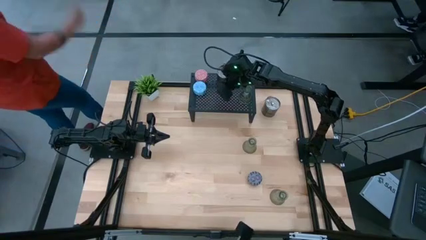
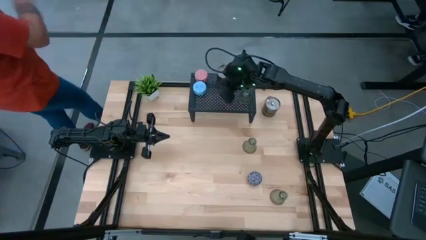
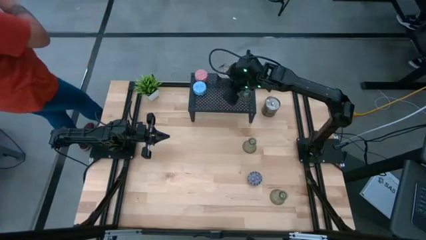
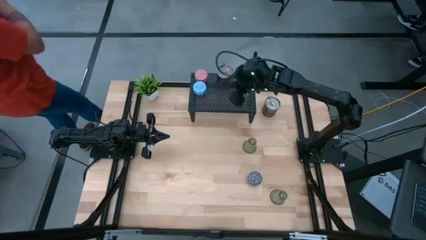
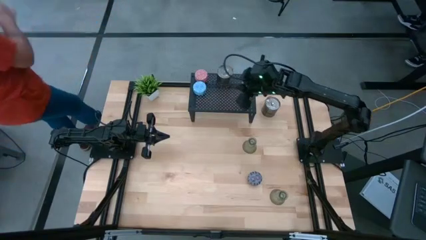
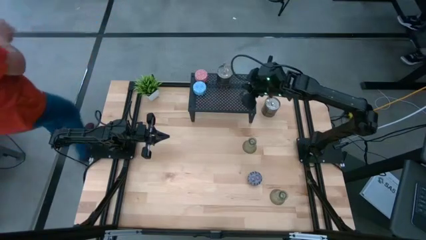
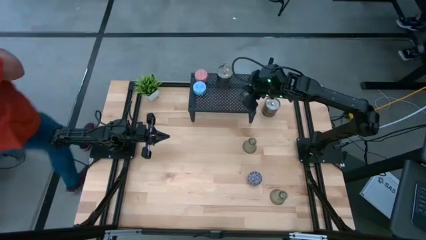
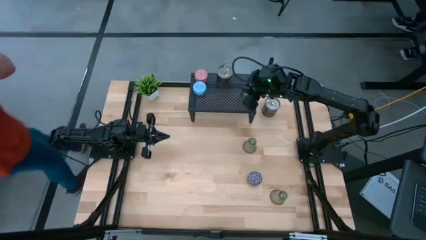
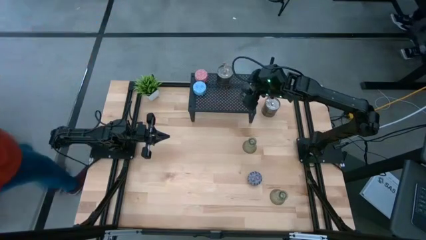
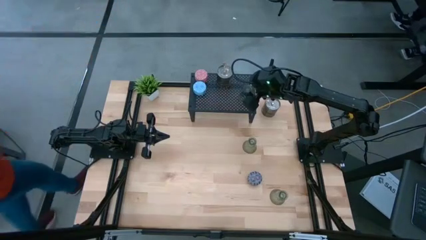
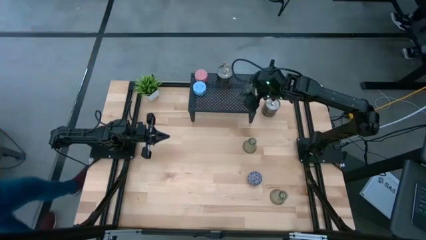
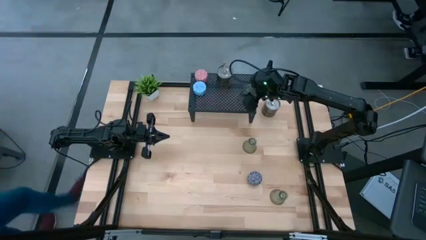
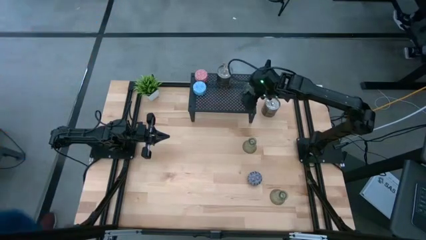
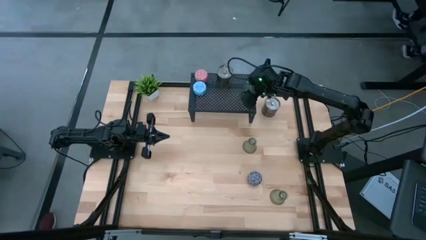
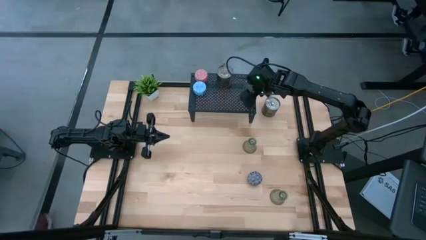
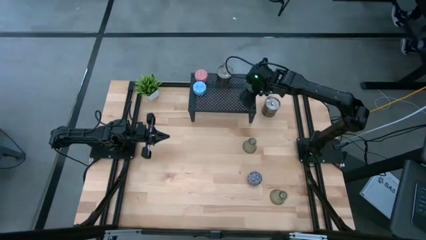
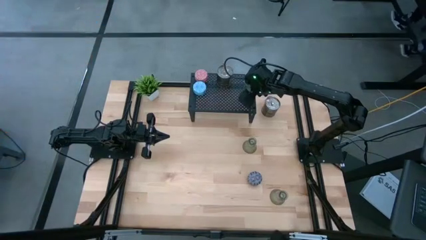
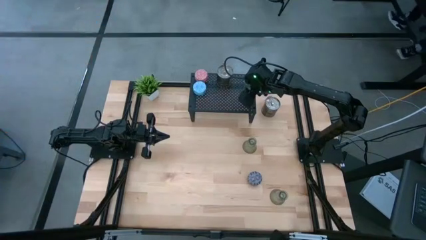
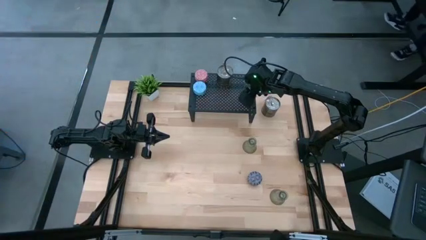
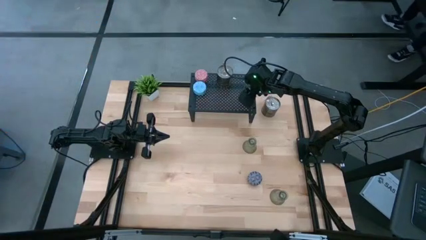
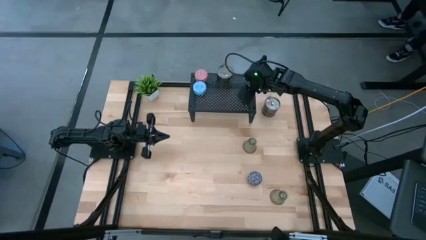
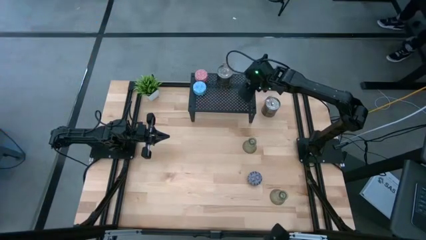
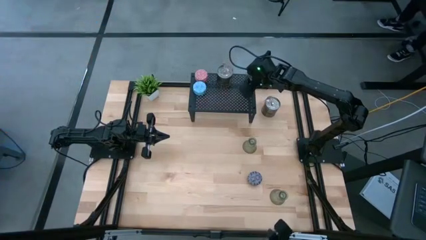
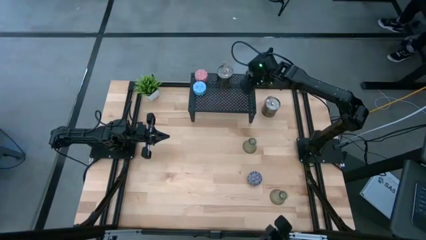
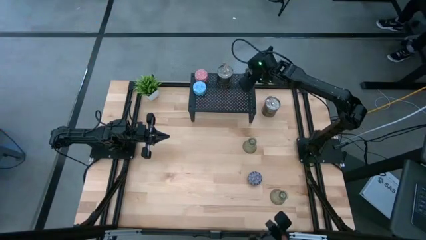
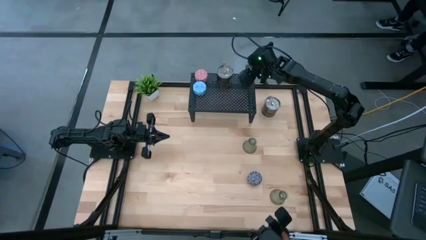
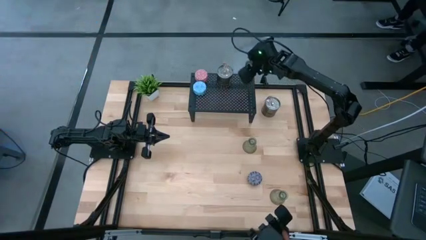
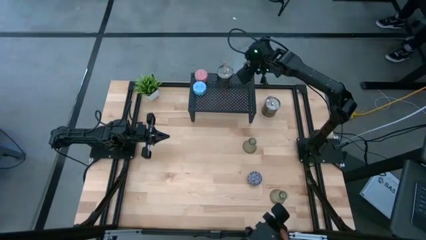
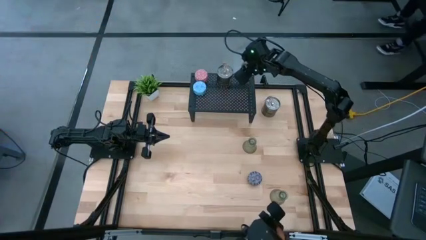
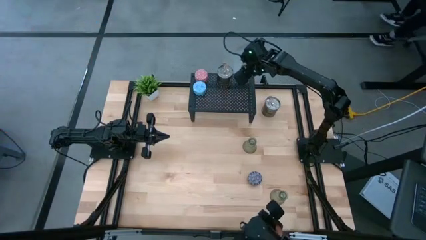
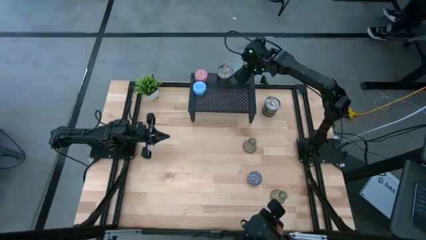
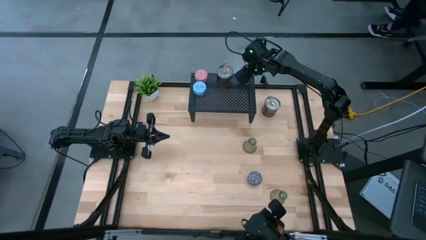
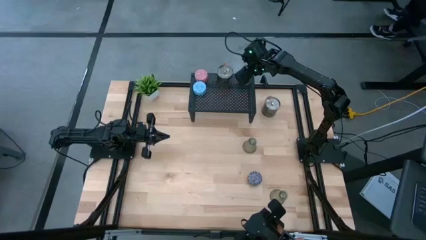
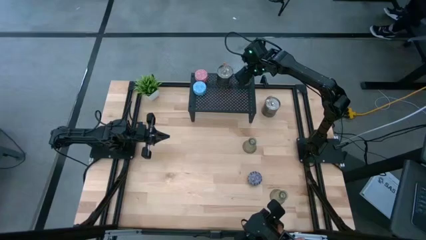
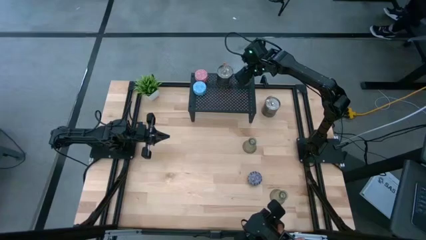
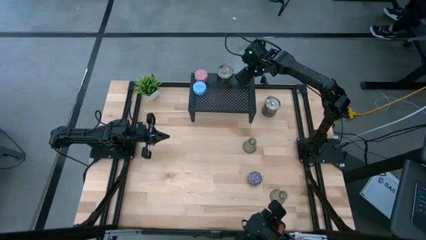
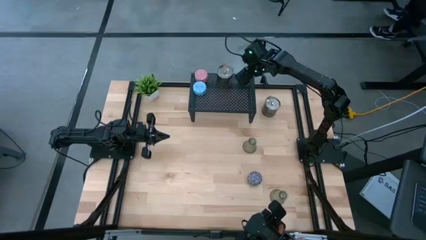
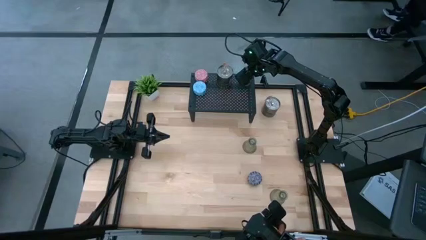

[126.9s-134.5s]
Task: Pick & Place candle stick holders
Adjust the green candle holder on the shelf

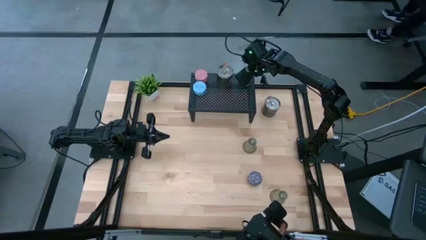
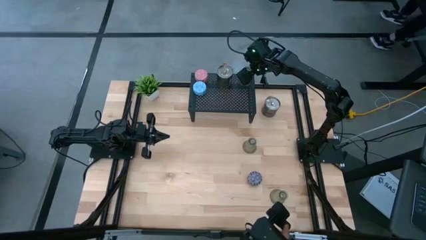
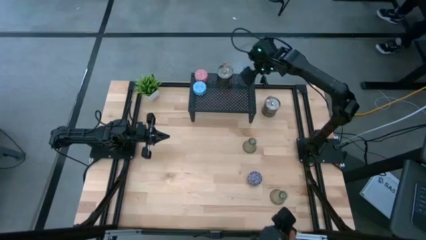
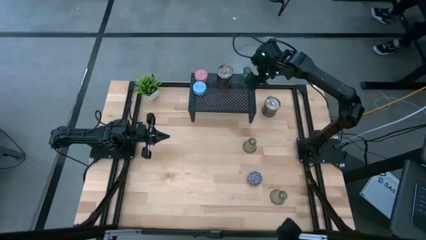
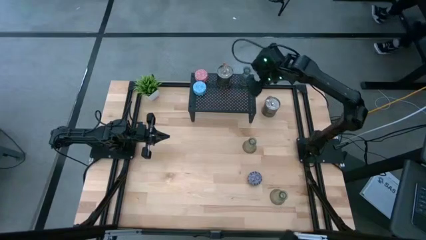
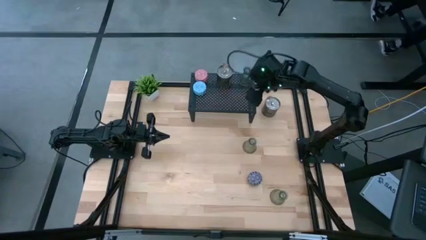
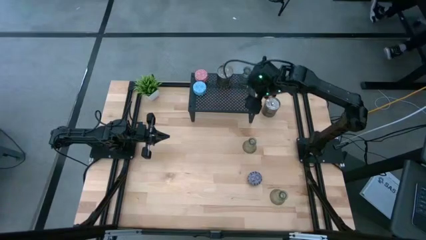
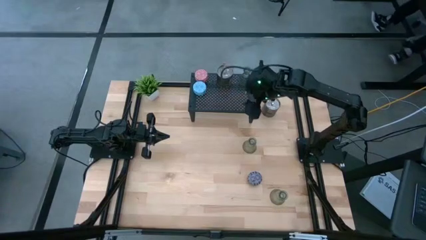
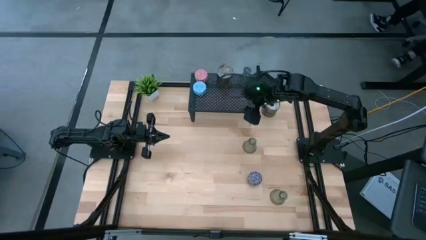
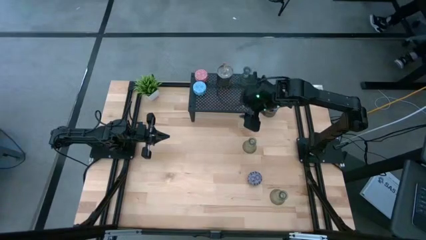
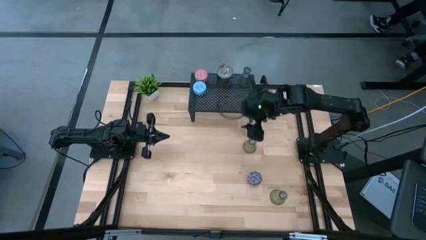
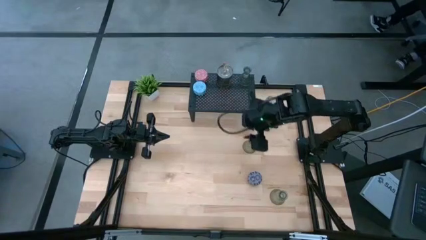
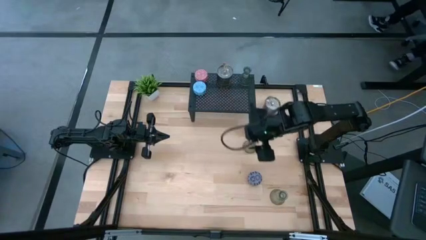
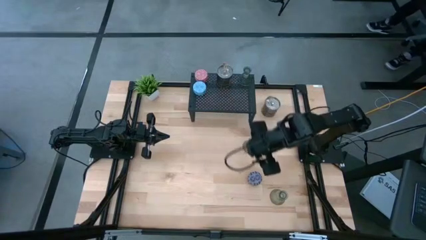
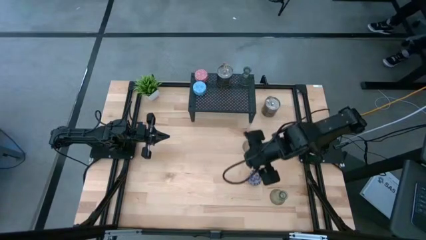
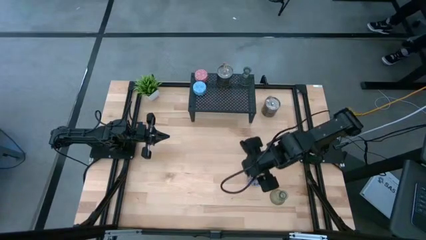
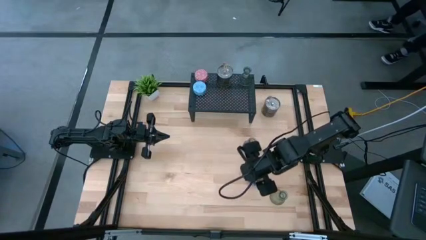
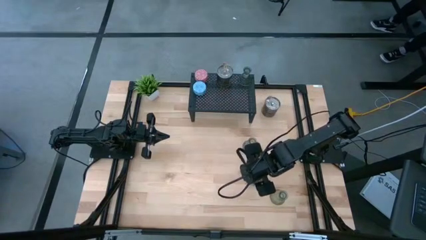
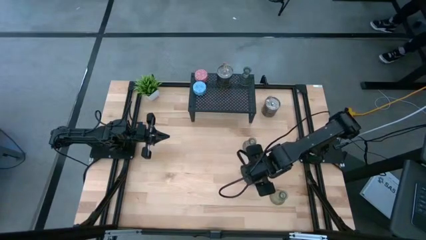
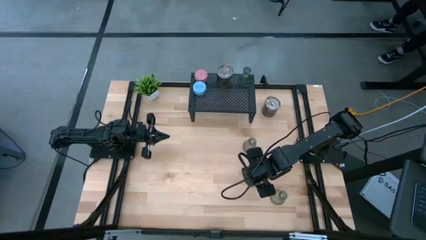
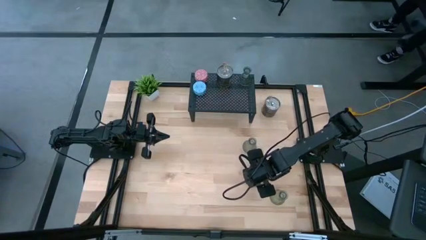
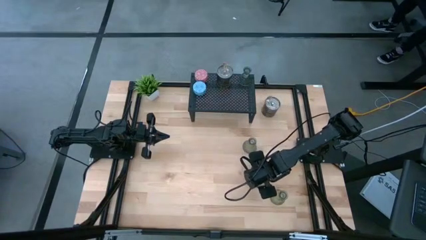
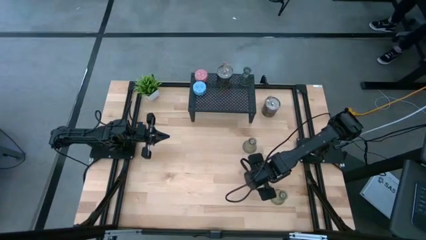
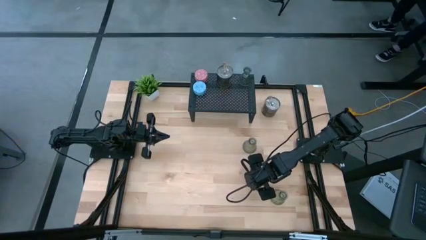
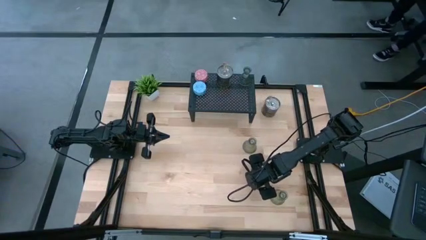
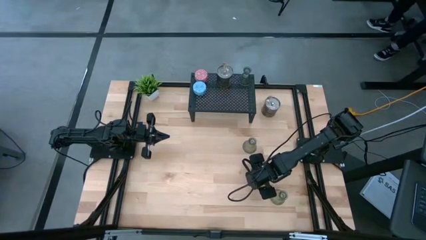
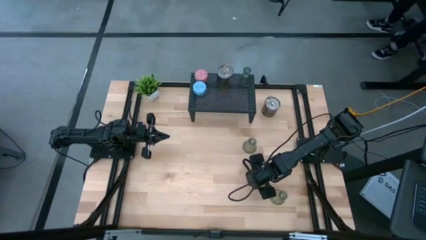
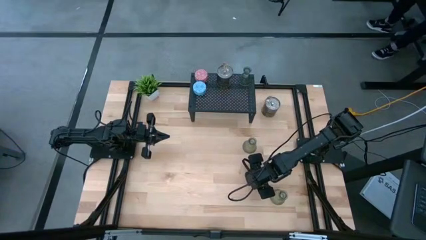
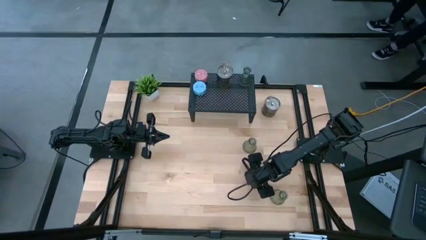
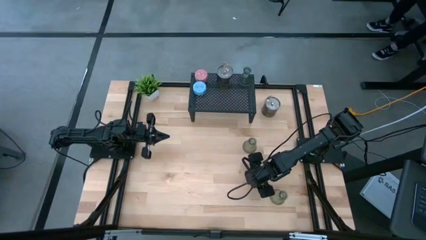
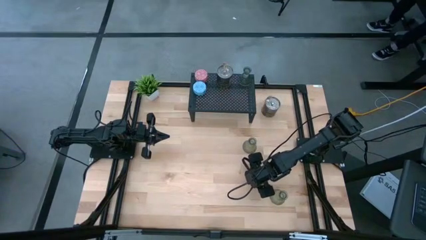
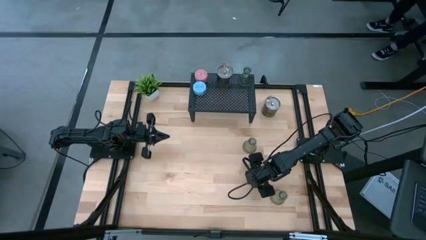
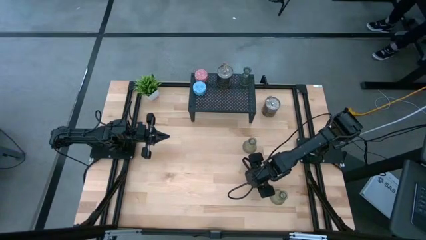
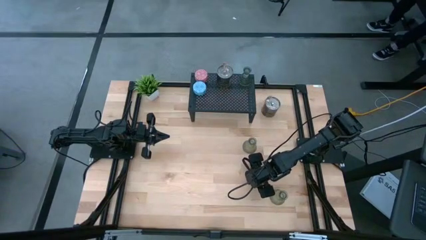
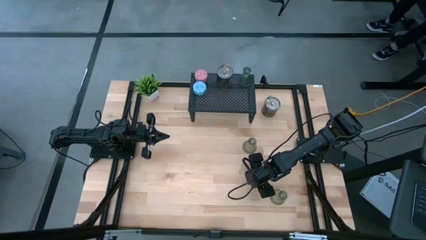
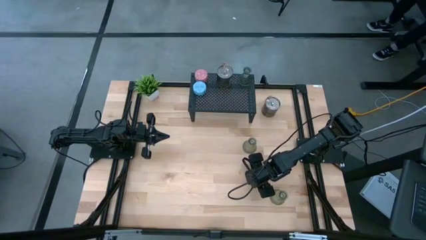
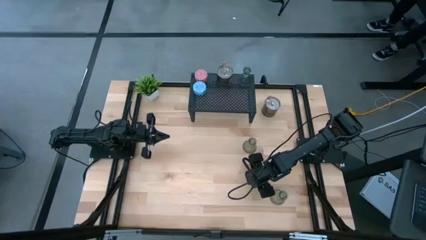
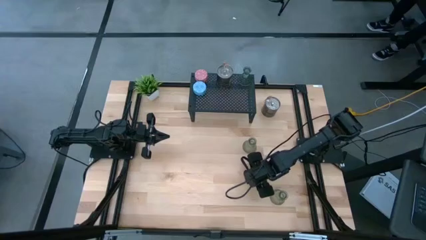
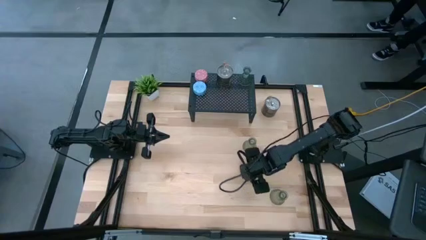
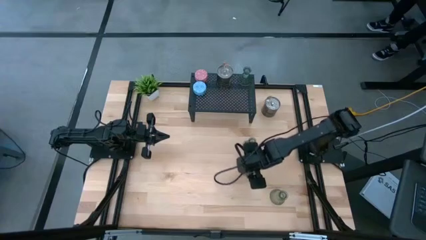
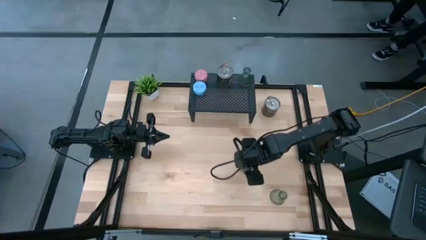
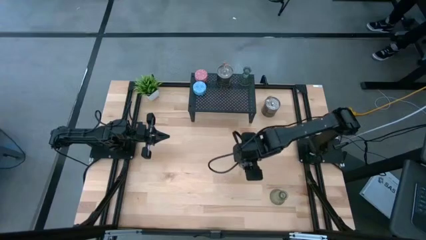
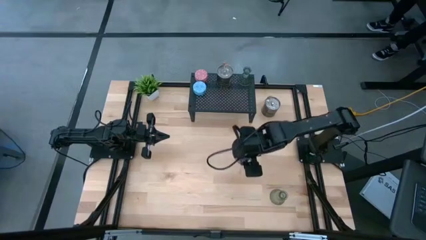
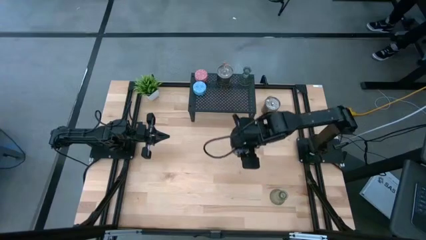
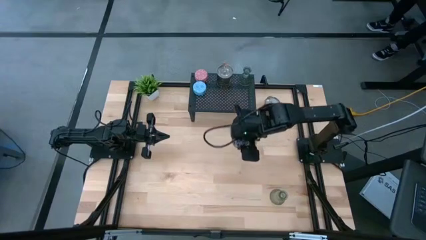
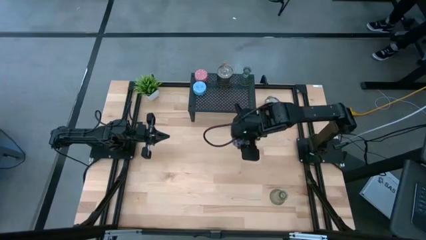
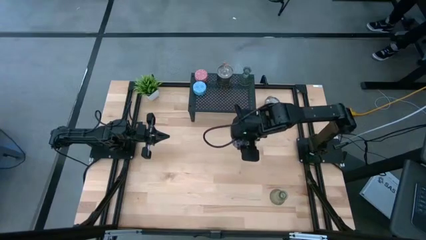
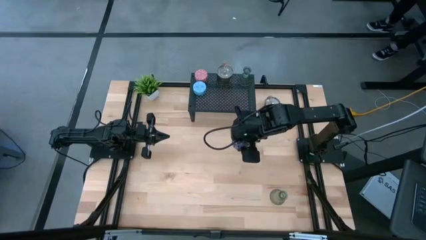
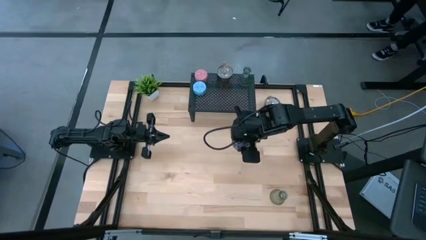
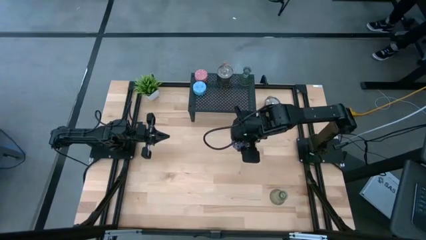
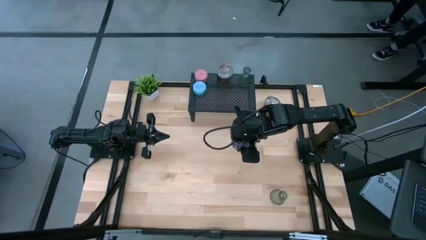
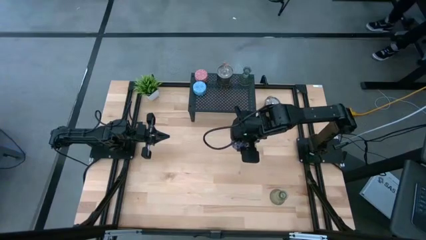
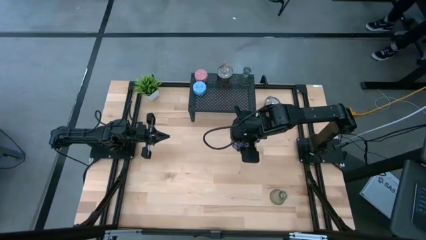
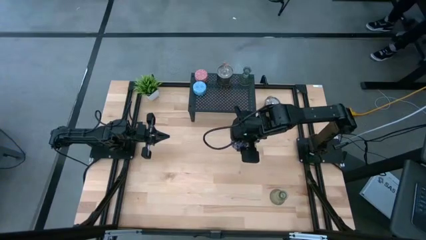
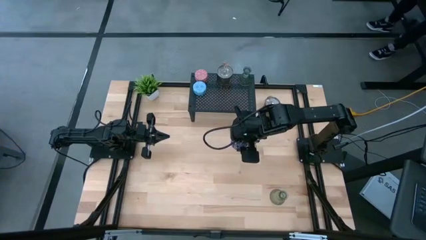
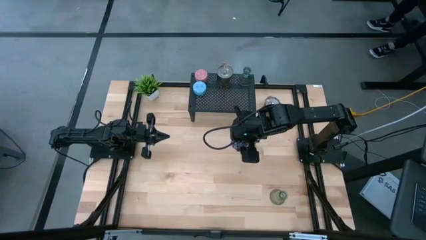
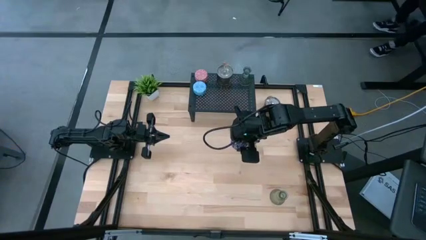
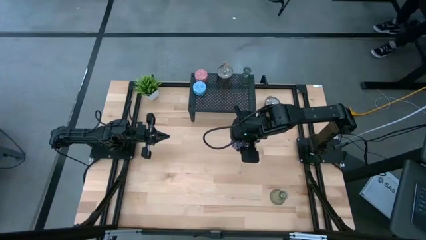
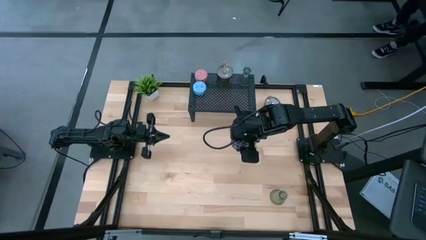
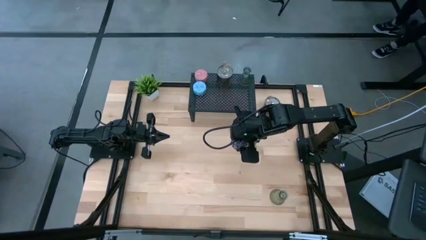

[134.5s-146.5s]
Put the black patterned scented candle on the shelf
